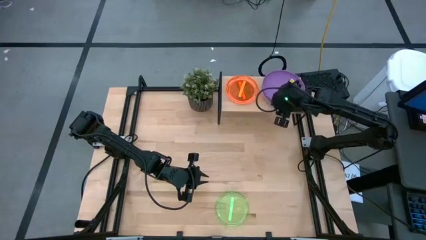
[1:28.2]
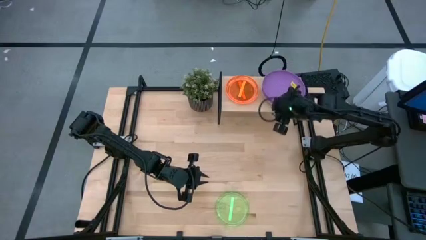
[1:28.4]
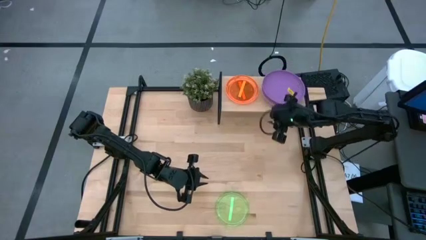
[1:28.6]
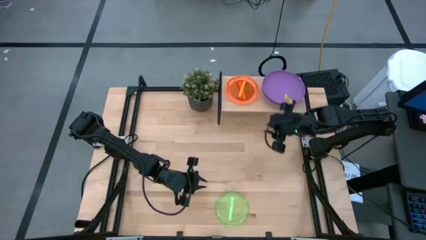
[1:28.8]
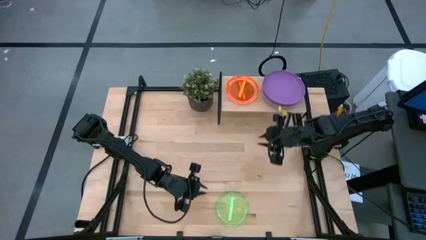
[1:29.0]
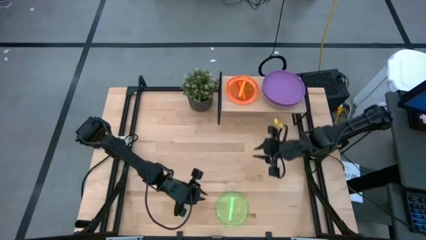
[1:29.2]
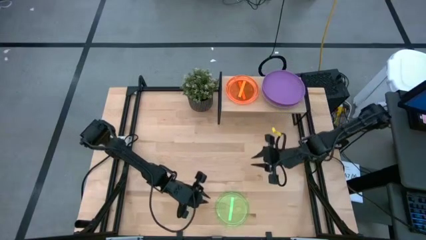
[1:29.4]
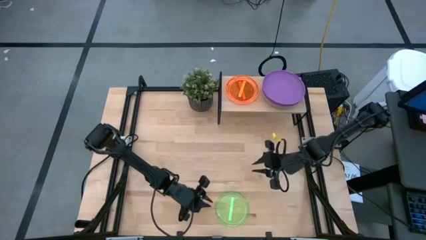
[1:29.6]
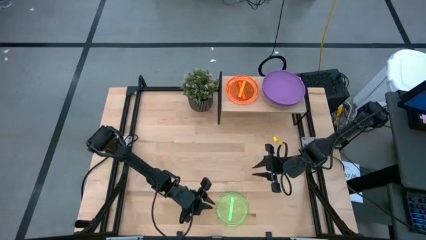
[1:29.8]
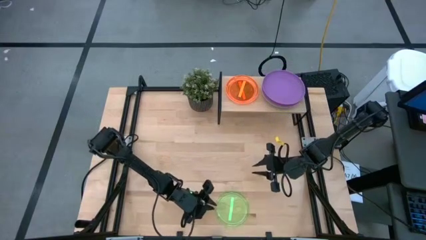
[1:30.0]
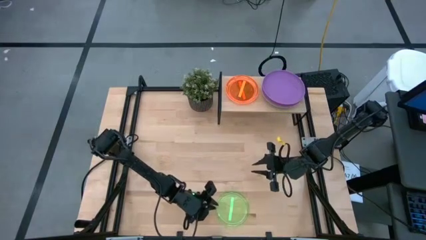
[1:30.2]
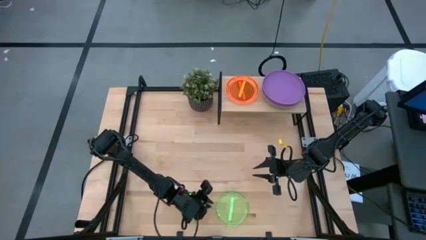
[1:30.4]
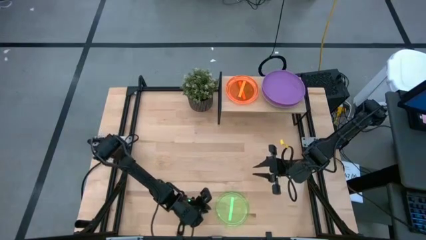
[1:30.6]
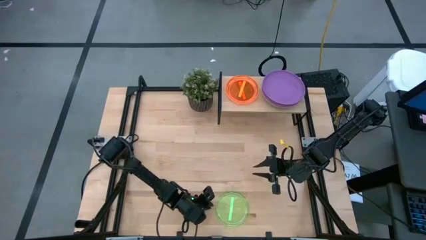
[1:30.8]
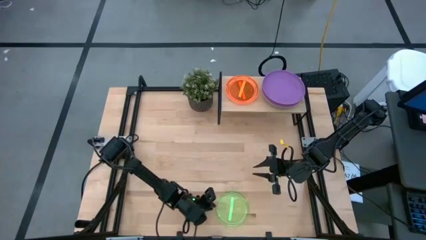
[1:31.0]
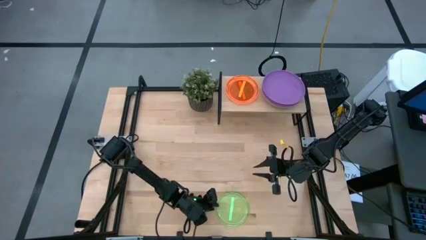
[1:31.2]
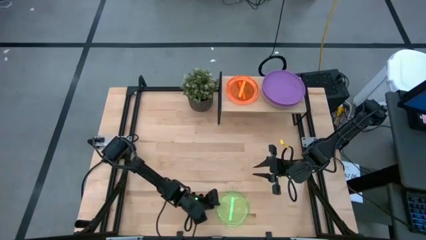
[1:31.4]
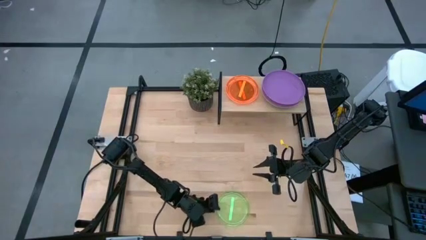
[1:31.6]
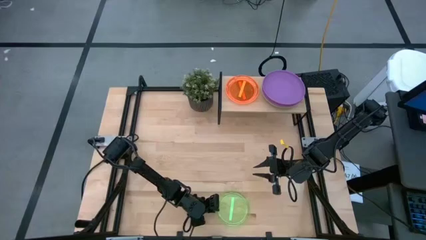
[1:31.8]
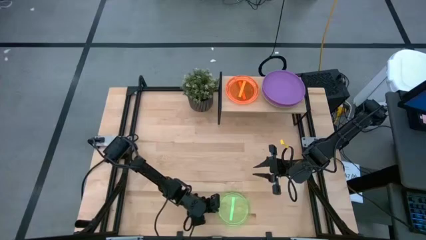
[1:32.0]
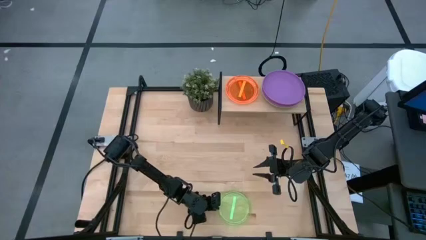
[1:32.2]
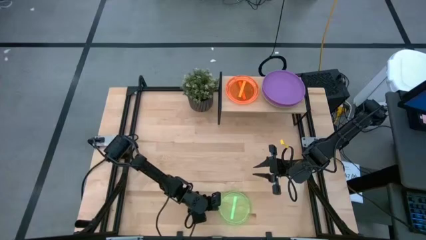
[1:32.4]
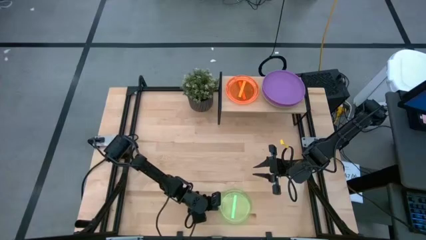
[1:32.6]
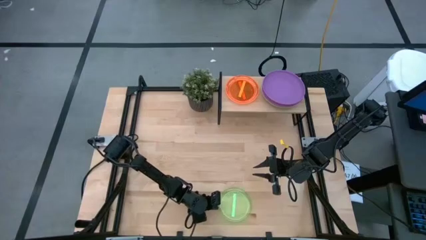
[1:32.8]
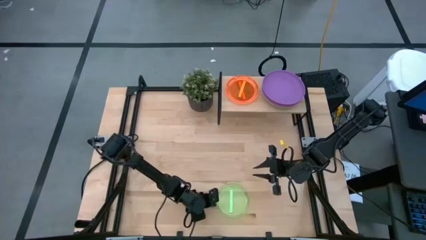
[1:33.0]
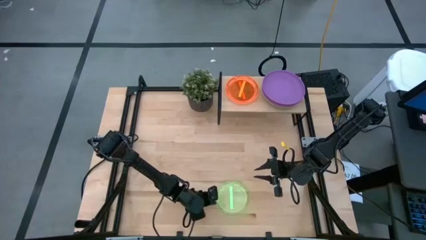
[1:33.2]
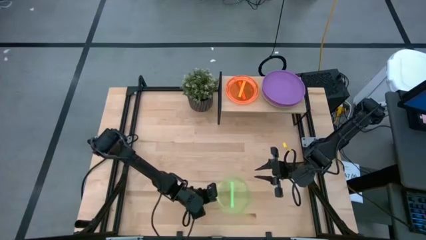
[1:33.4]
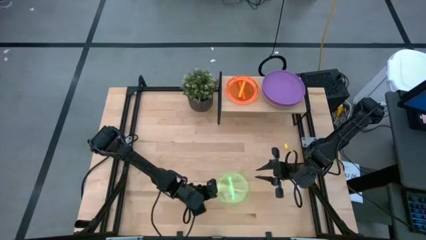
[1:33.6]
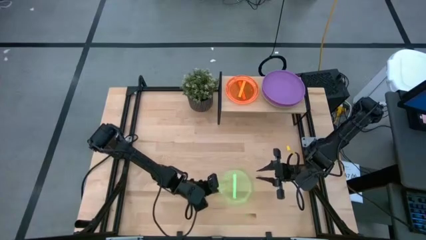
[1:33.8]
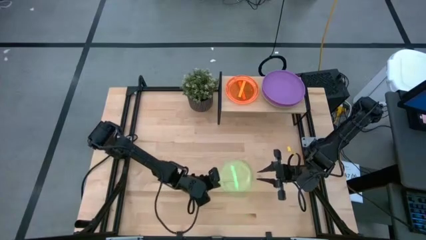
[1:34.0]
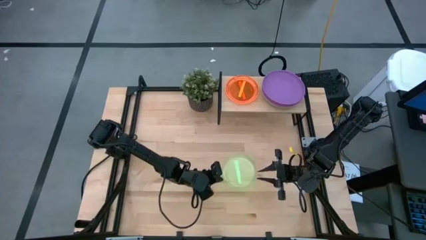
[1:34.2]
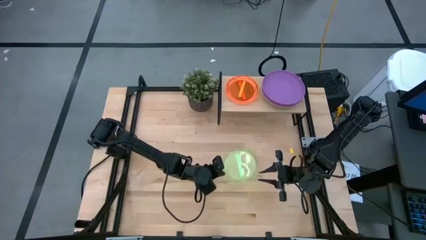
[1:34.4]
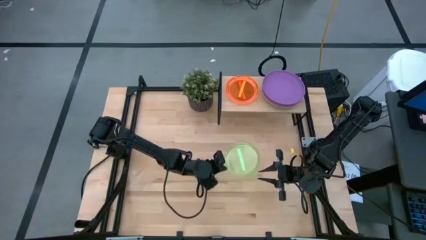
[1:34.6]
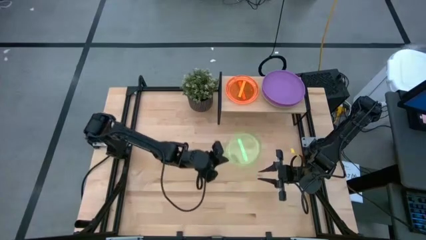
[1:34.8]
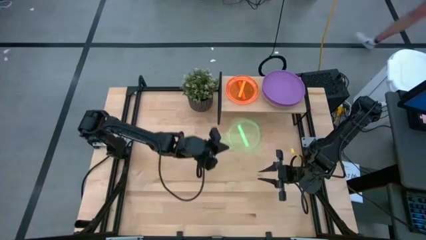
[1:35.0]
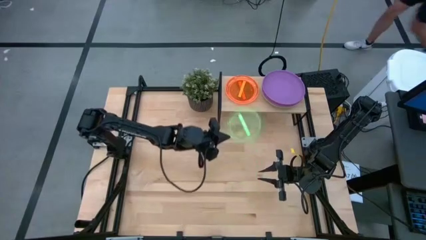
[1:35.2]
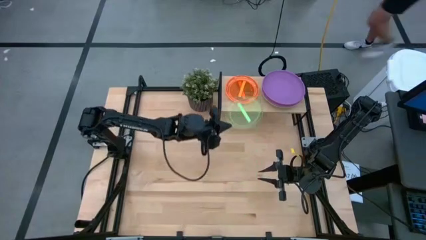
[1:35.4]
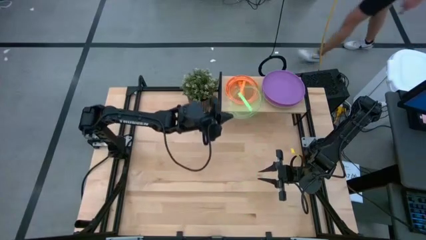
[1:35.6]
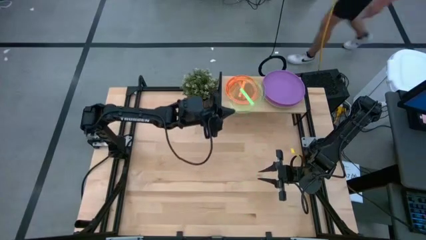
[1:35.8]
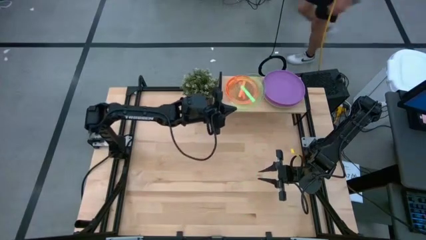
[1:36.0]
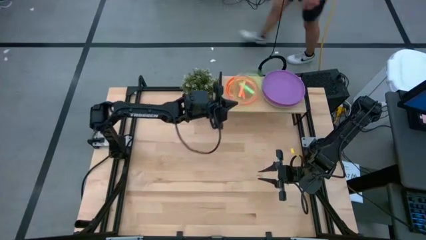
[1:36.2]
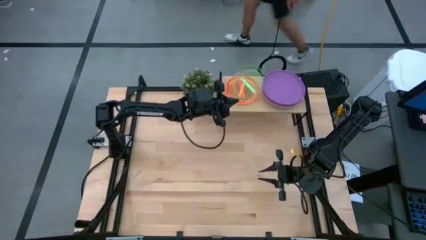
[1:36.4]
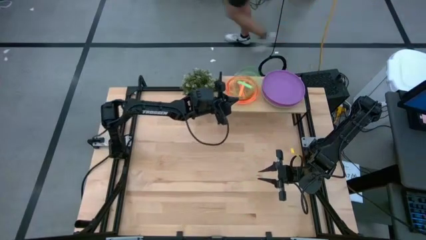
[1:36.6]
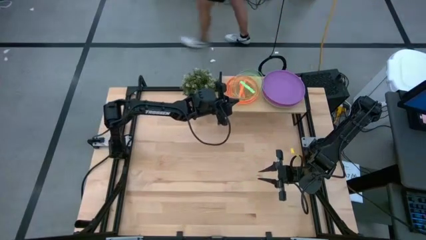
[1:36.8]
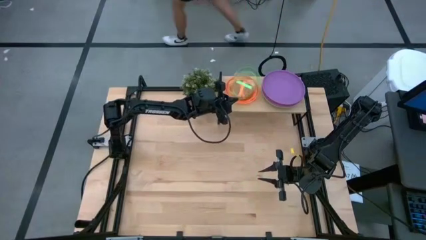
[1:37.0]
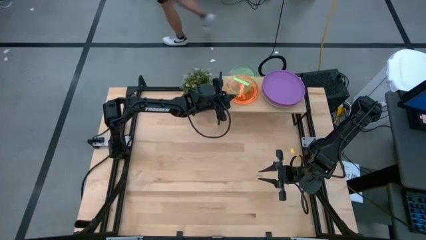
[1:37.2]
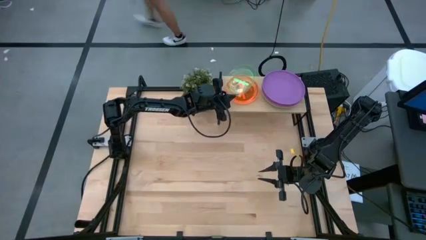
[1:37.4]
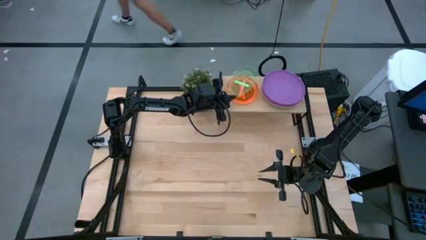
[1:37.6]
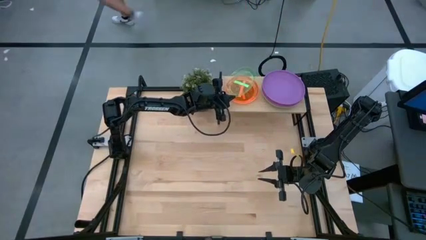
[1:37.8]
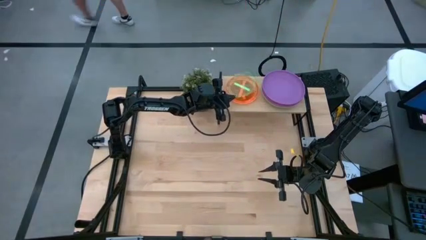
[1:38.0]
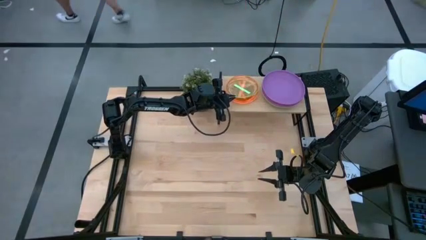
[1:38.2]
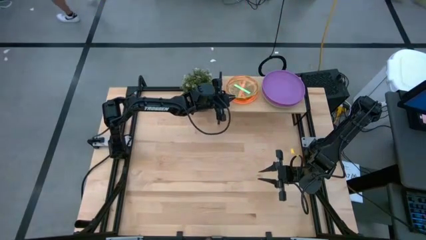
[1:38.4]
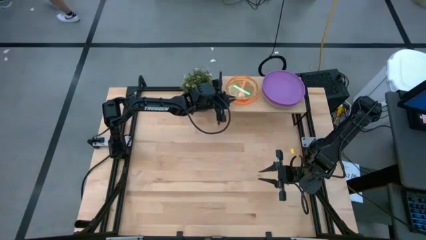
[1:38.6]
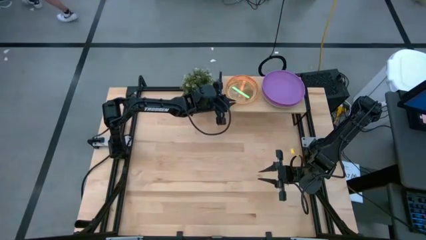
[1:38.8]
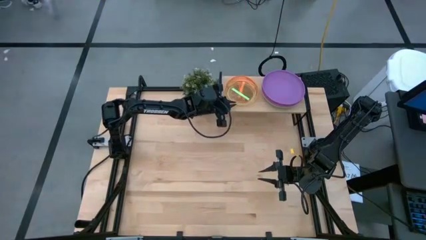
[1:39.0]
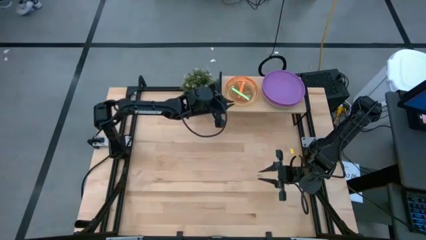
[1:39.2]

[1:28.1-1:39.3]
Task: Place and stack plates onto a shelf
Stack the light green plate on top of the light orange plate on the shelf

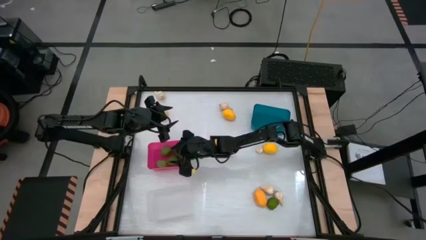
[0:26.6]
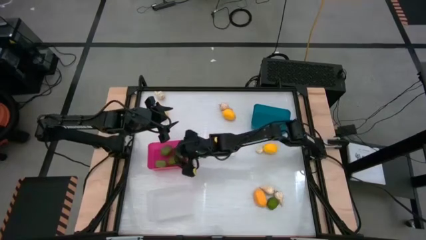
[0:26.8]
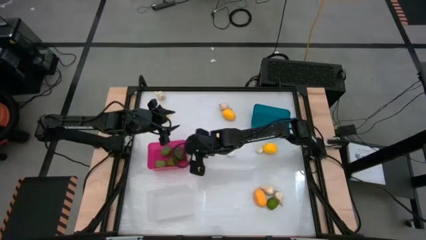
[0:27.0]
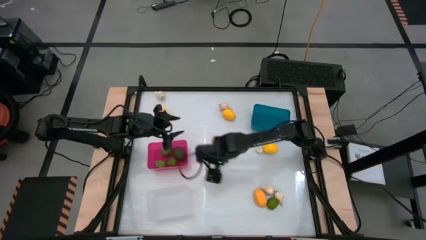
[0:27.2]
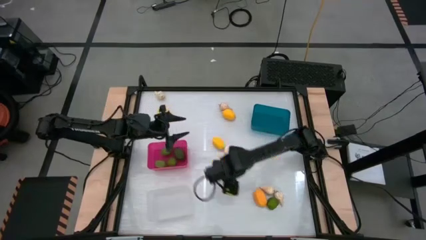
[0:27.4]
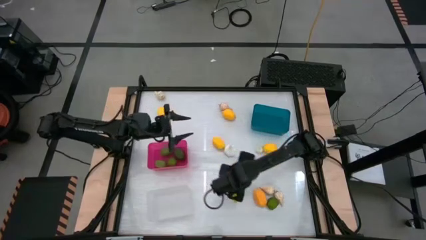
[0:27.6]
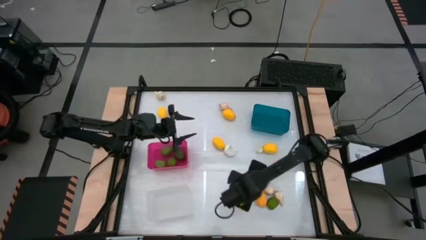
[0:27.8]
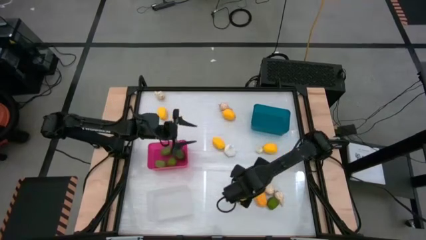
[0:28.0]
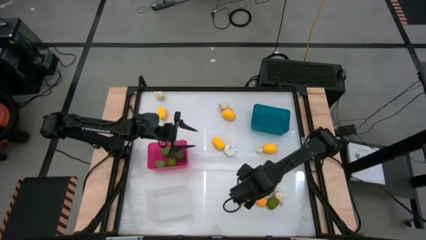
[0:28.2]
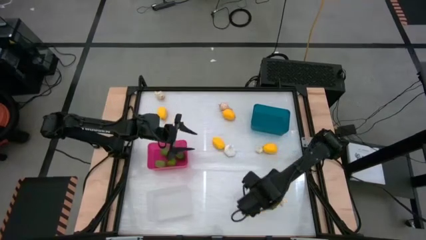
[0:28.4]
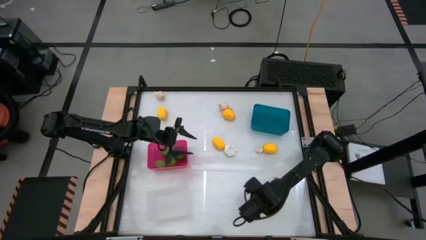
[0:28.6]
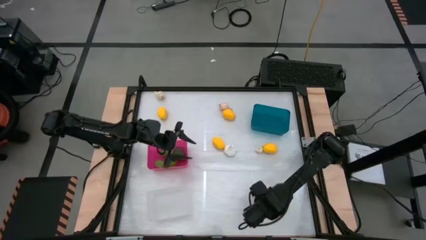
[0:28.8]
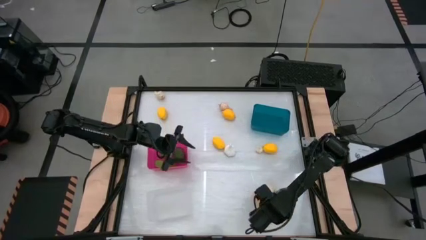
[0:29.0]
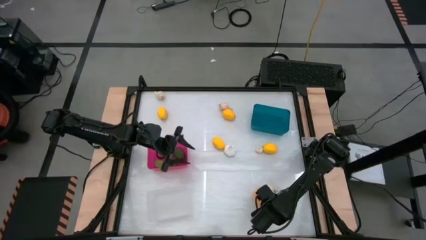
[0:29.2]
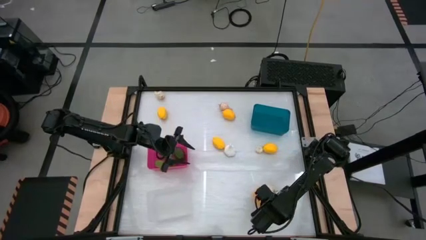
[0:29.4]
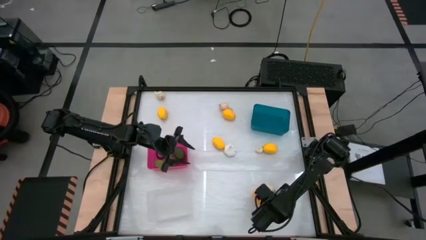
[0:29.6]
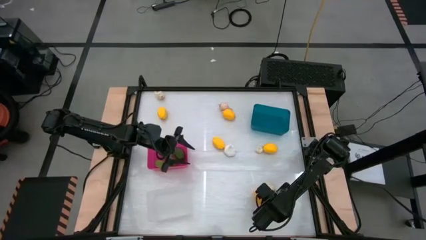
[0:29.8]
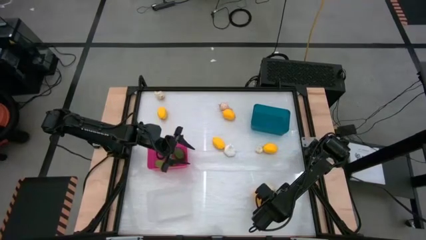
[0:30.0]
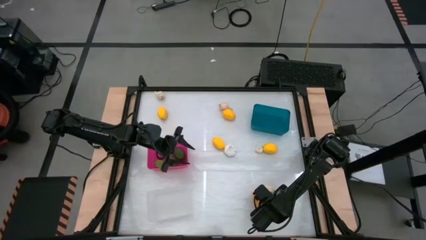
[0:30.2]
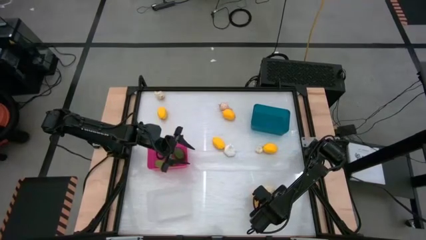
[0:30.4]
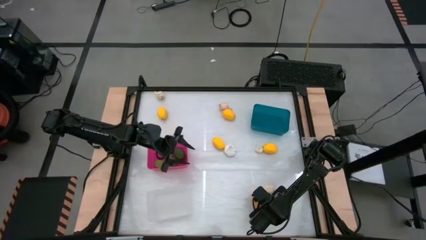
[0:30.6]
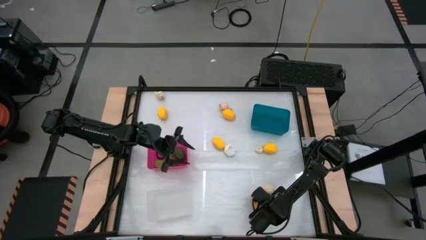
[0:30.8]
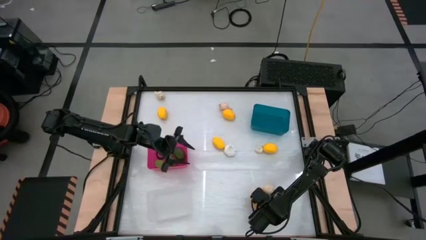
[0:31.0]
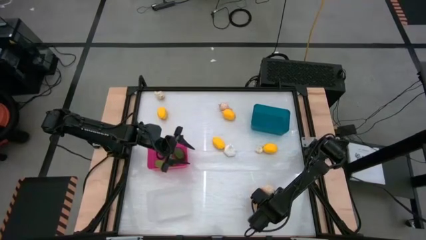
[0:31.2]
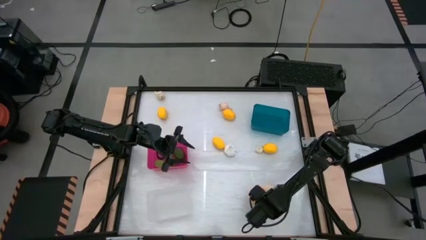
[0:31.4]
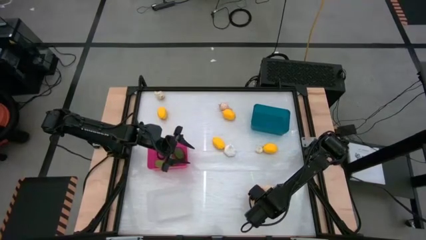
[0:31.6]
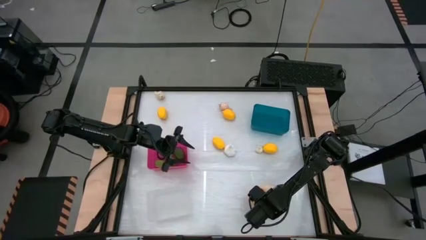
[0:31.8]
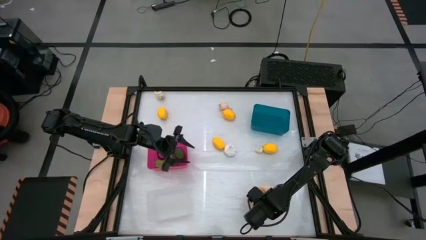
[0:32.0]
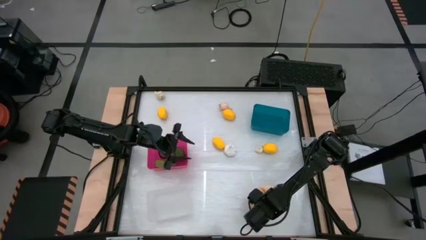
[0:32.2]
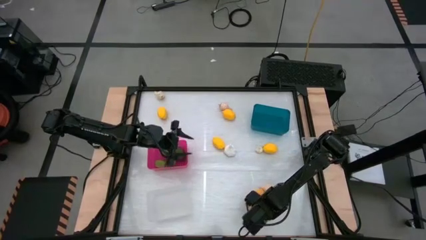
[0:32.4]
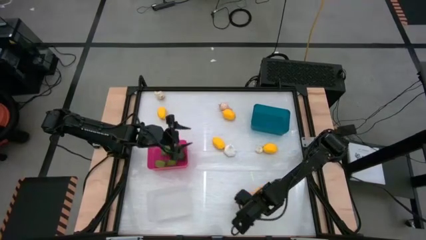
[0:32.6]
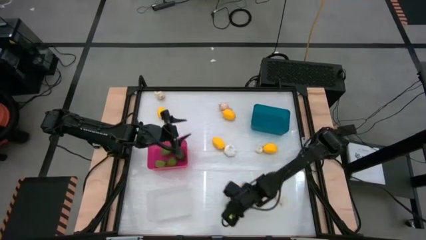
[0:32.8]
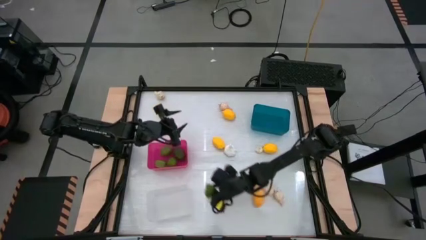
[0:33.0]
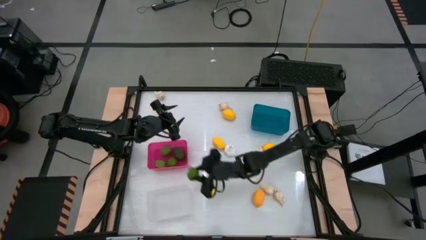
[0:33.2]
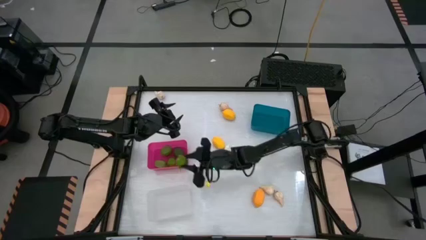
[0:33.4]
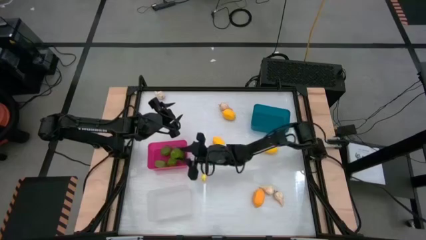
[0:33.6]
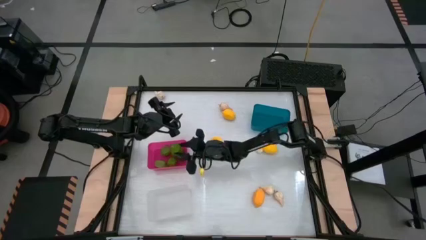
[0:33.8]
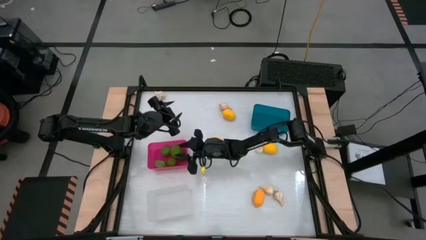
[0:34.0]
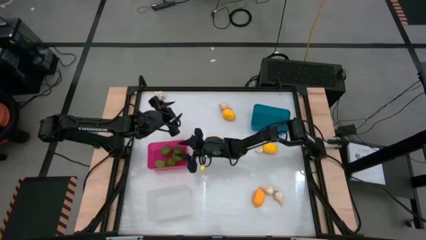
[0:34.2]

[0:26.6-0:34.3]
Task: Sort produce into baskets
Put the lime into the pink bin
